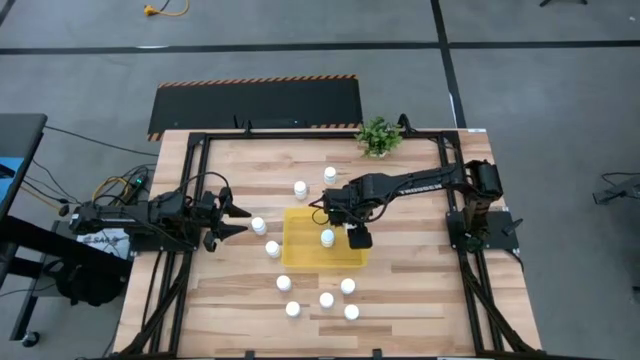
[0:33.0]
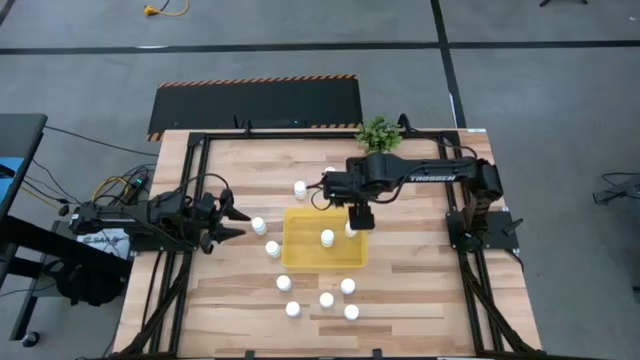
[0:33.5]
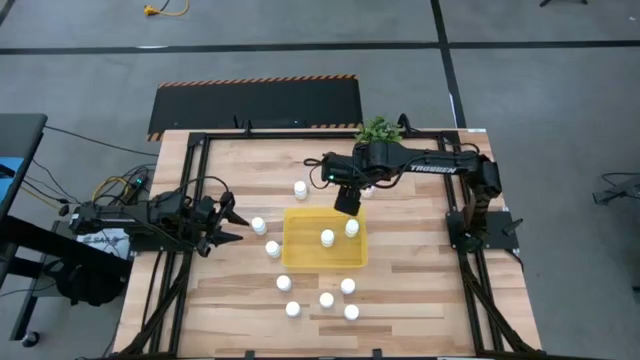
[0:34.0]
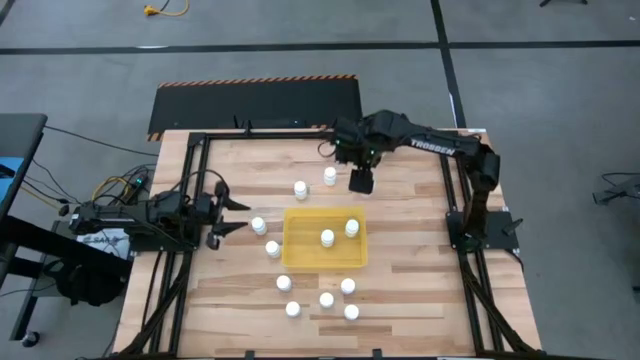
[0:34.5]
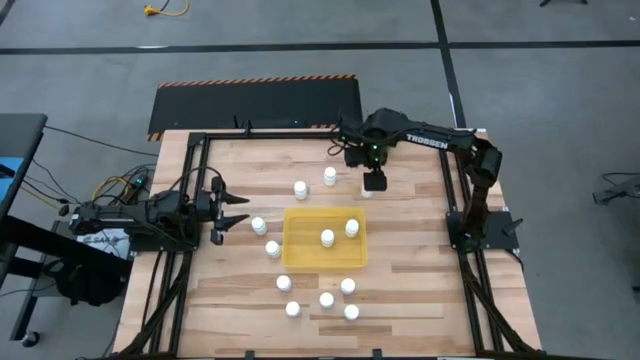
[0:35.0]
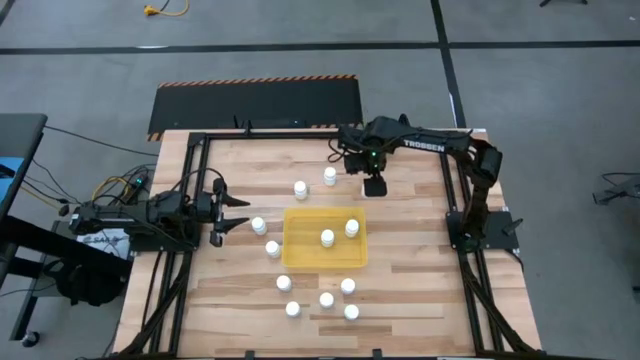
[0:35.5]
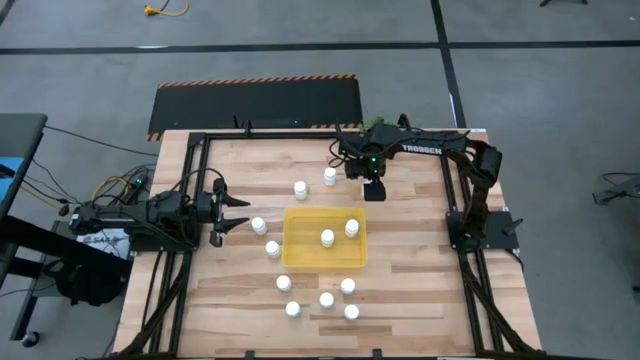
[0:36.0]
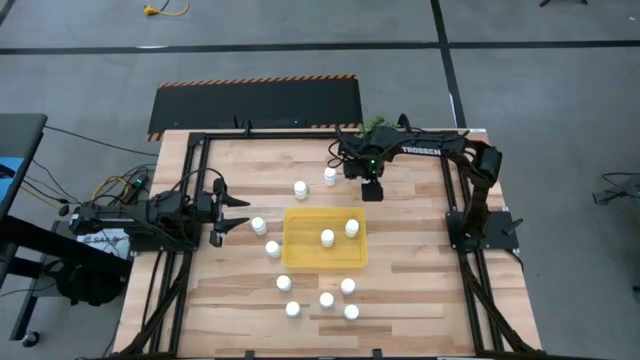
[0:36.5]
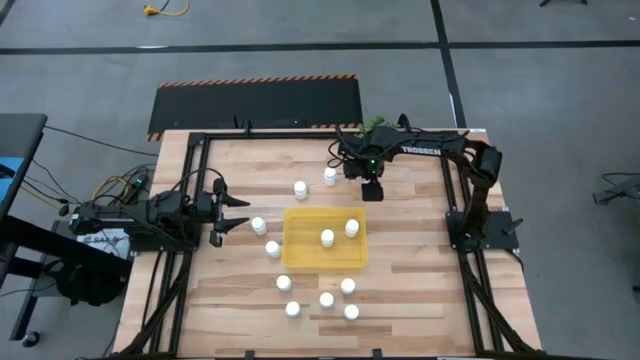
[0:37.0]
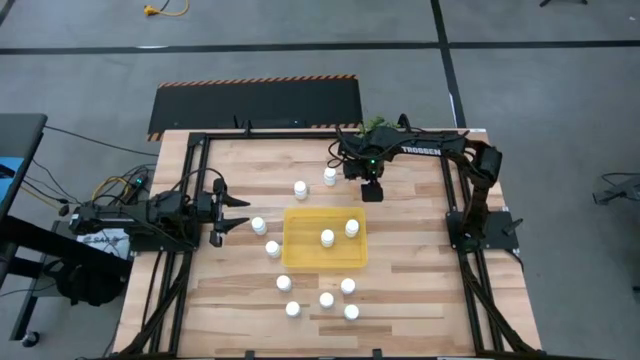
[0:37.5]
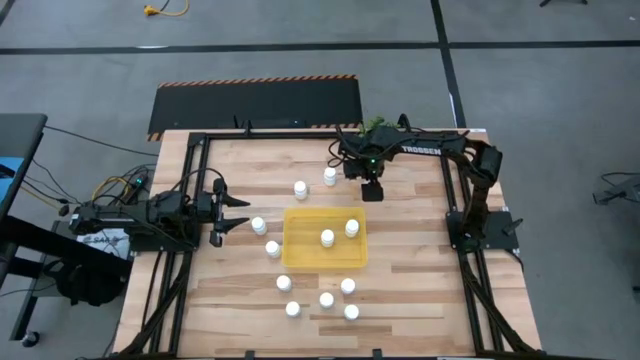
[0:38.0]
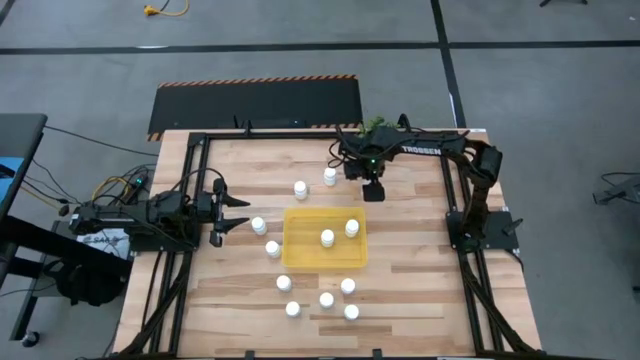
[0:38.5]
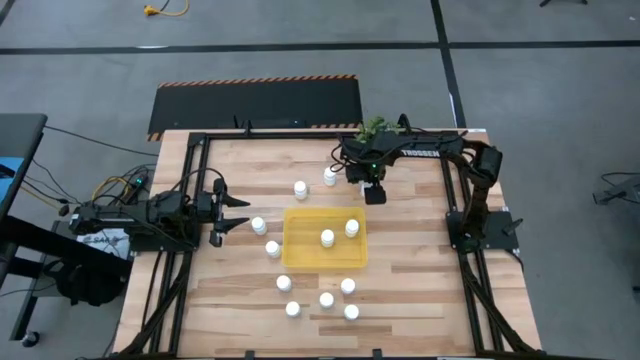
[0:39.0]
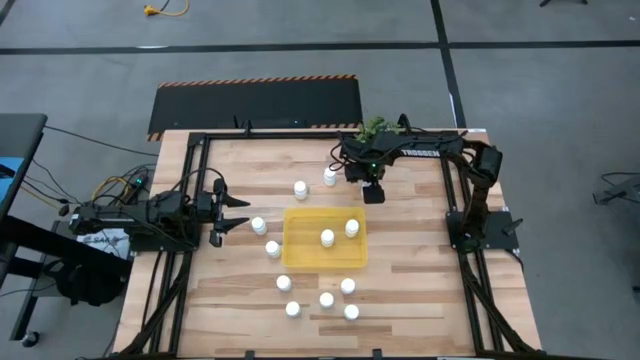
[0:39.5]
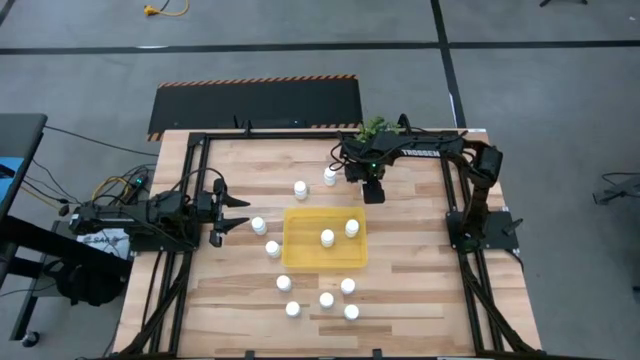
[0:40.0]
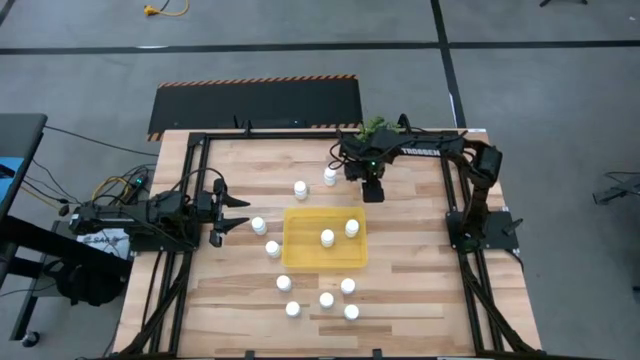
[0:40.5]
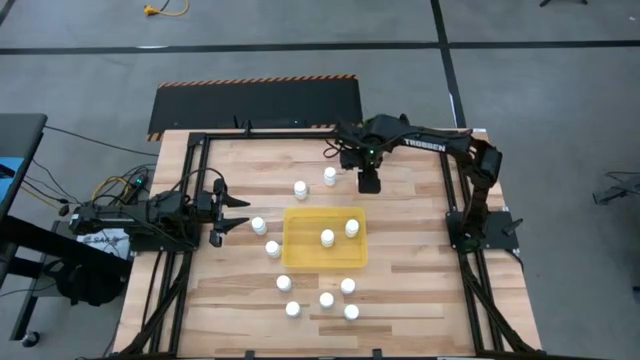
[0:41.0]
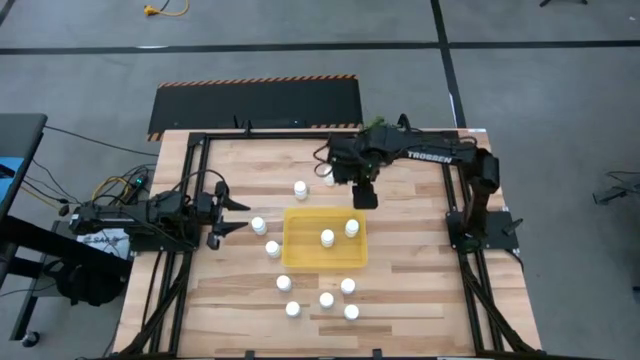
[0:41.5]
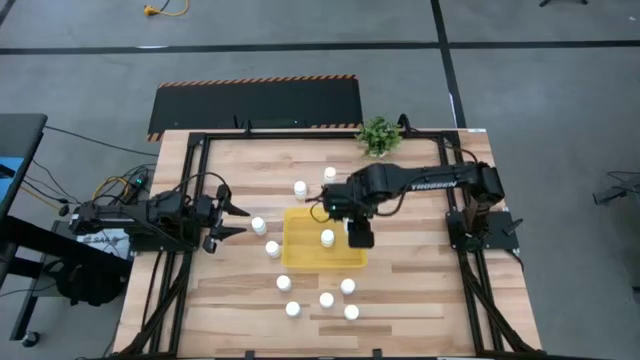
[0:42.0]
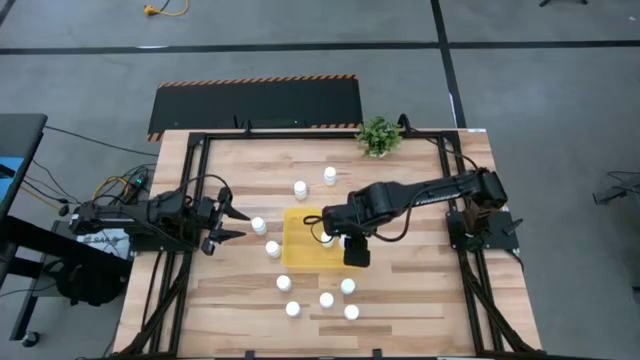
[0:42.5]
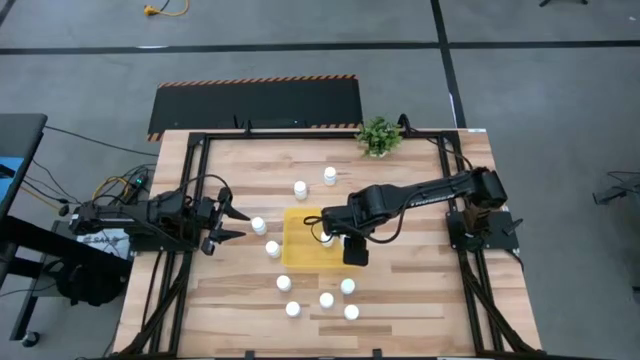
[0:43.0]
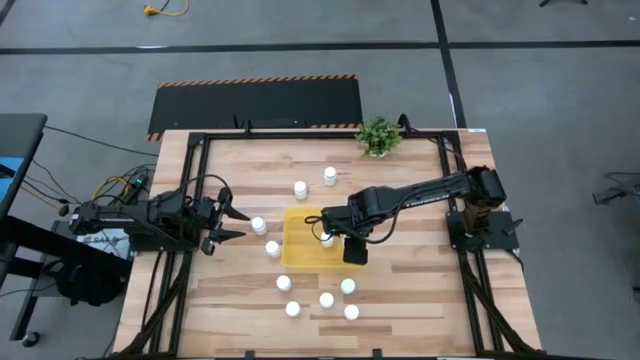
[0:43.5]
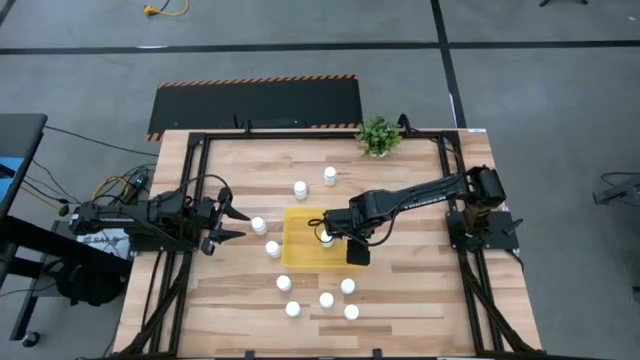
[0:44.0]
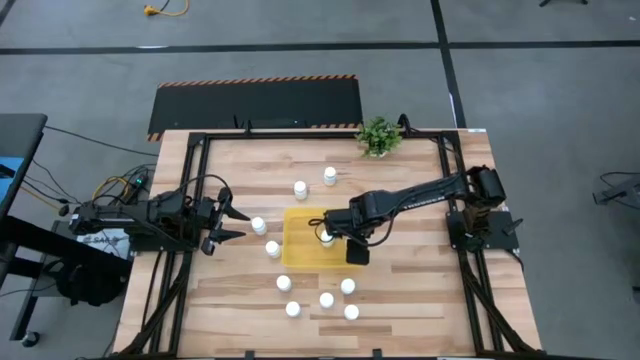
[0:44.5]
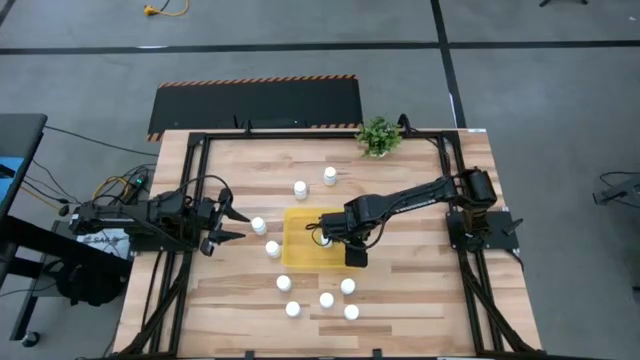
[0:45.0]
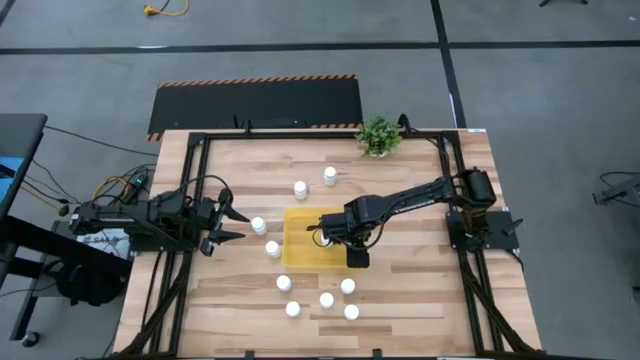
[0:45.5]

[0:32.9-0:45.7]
Task: Pick and place pill bottles into a basket
Put the white pill bottle into the yellow bin

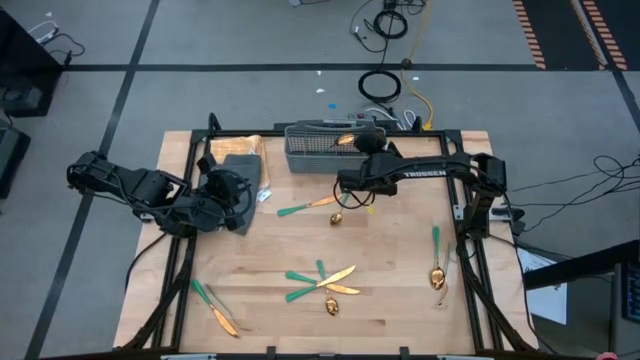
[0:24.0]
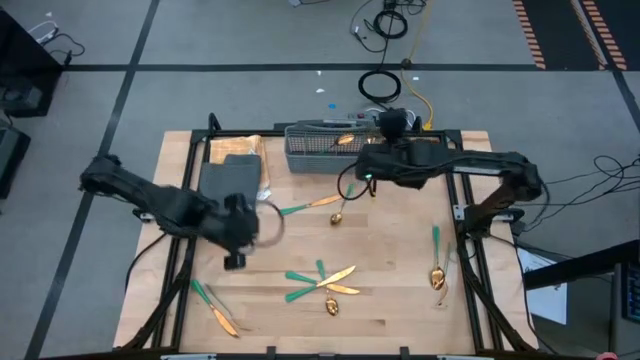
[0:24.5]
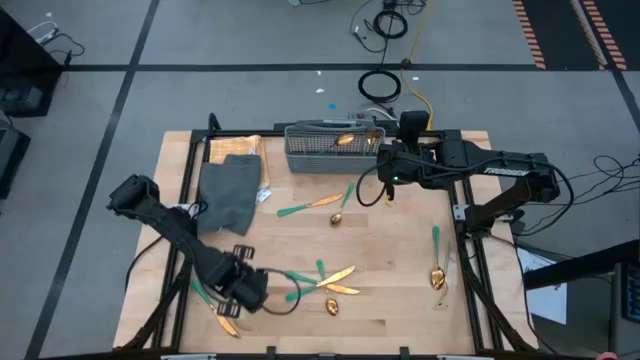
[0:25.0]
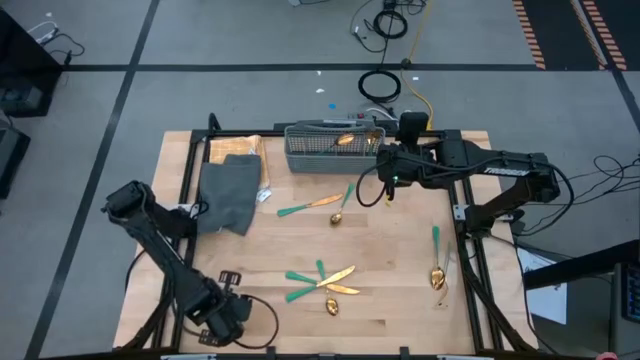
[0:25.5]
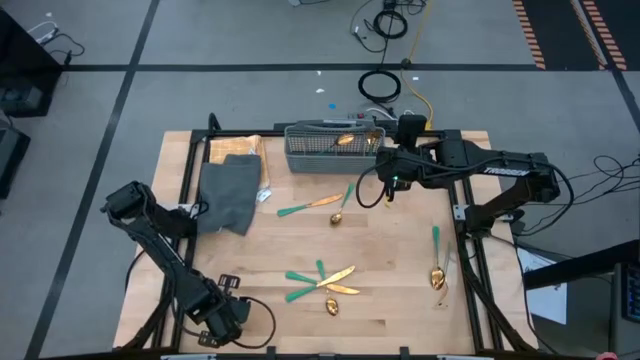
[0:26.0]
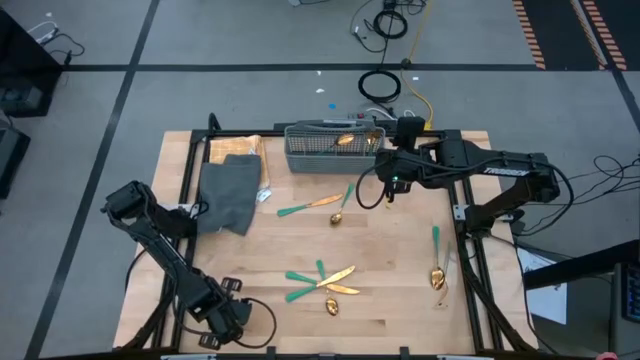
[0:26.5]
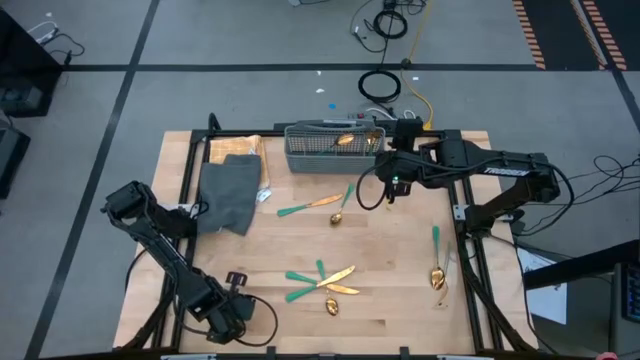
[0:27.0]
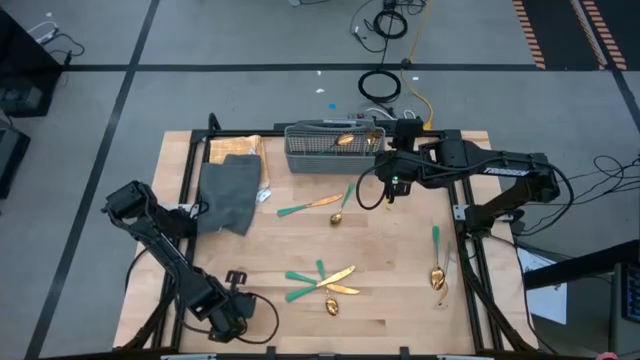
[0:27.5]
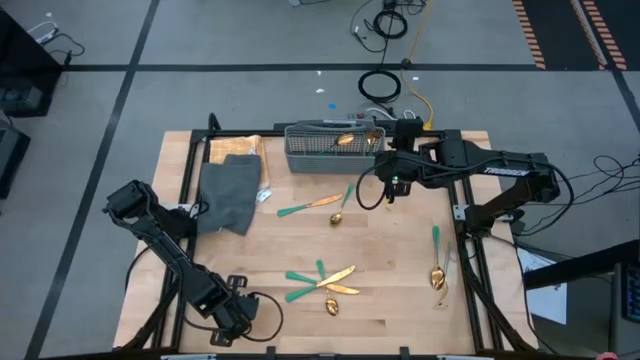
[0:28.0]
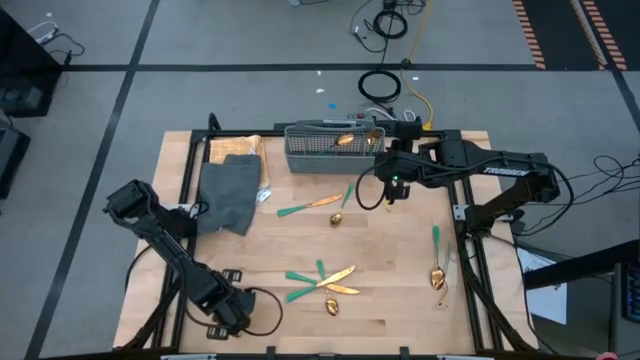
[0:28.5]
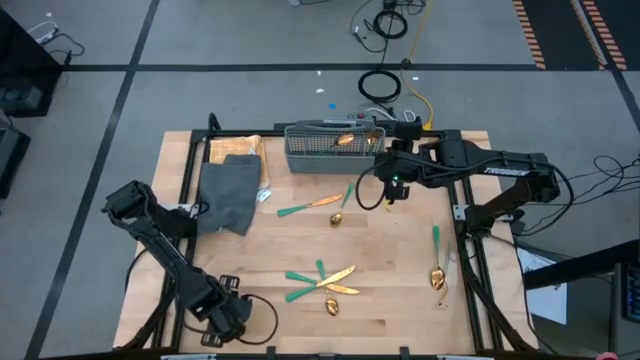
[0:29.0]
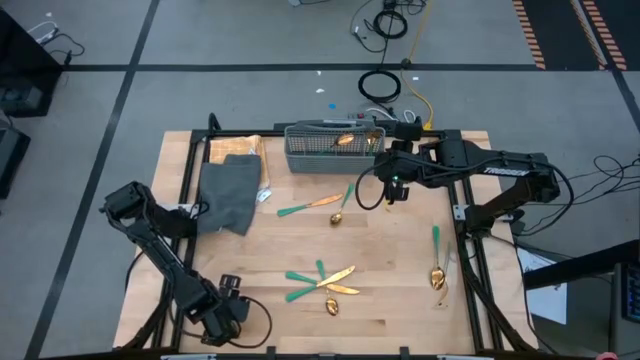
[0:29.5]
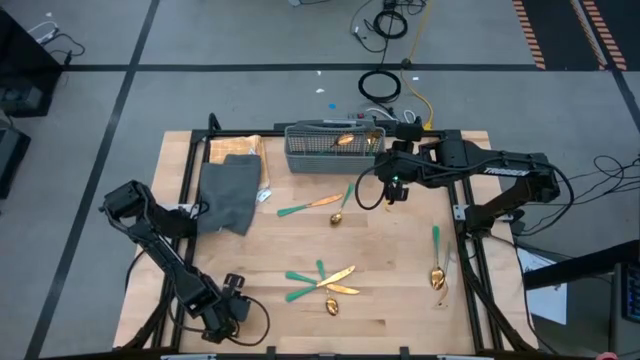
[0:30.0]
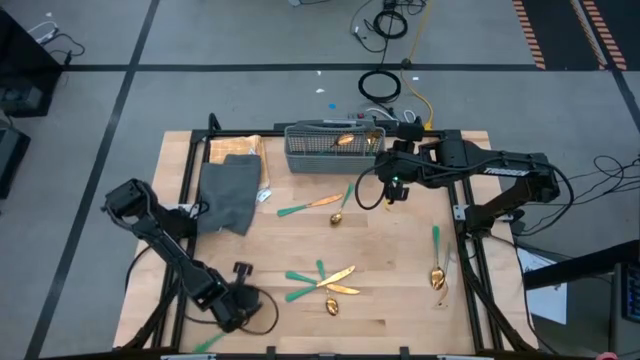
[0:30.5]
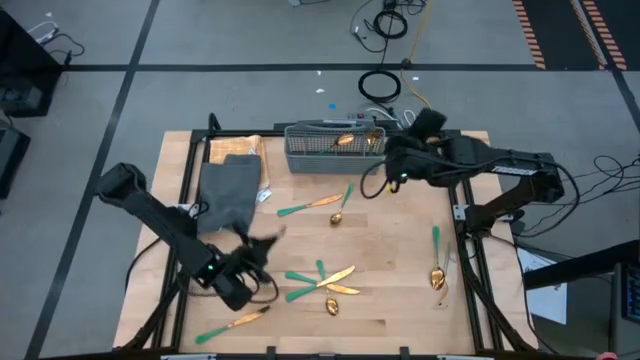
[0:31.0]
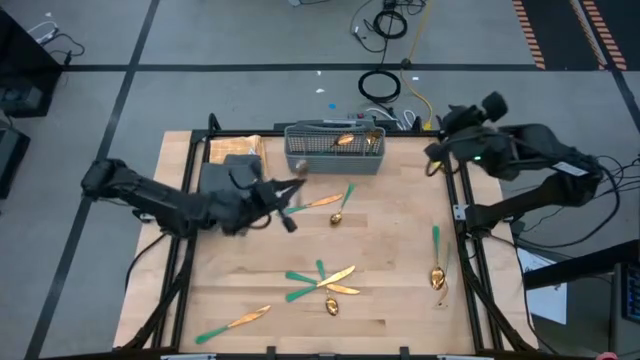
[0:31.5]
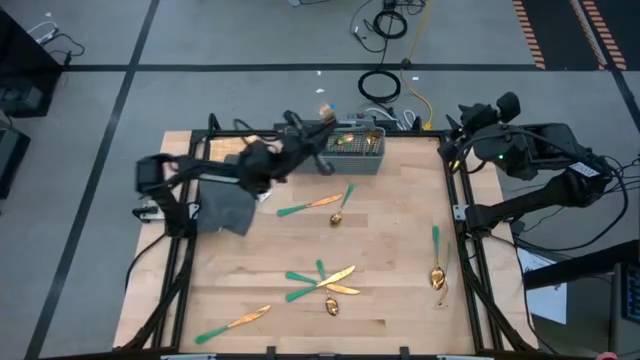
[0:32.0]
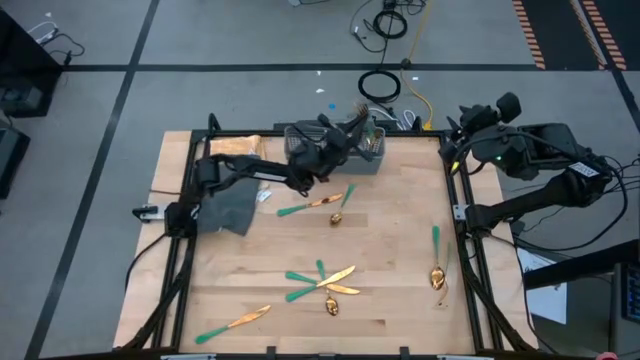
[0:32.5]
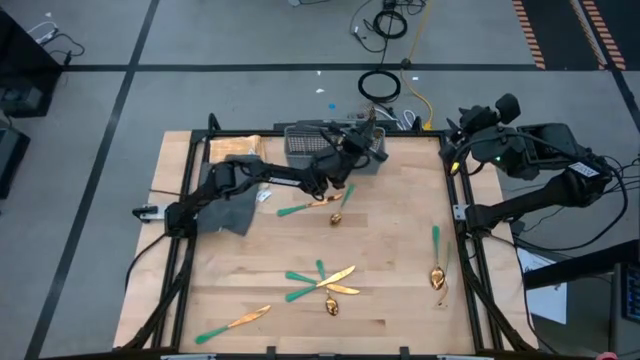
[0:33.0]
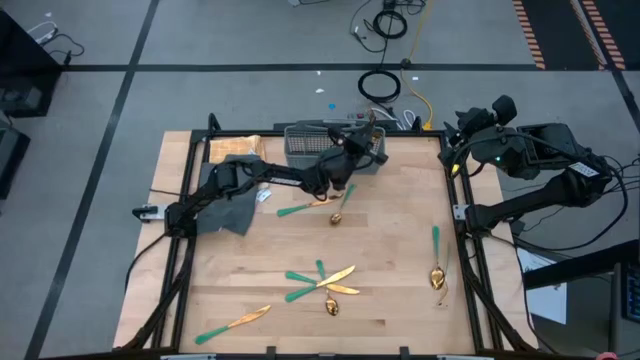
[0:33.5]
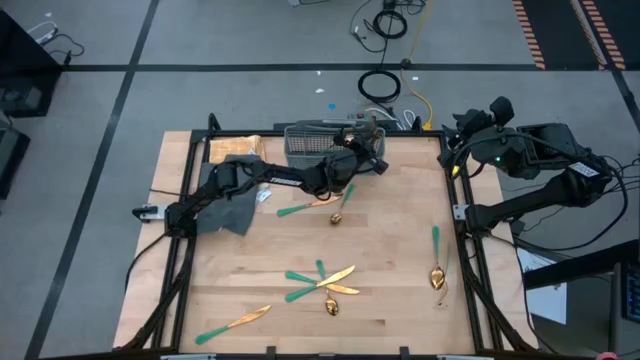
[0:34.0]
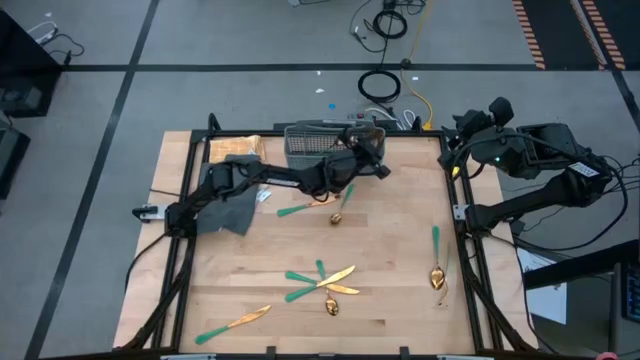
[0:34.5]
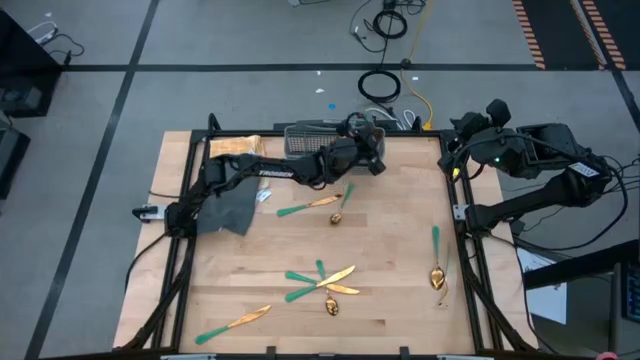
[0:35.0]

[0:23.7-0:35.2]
Task: Sort silverware
Put the green fork into the gray silverware basket
